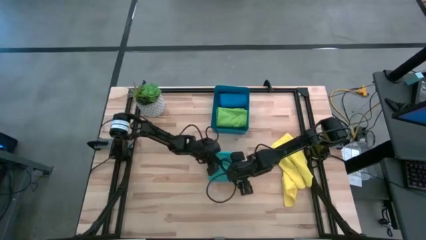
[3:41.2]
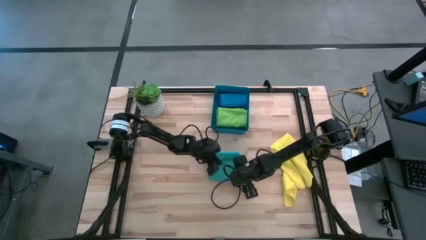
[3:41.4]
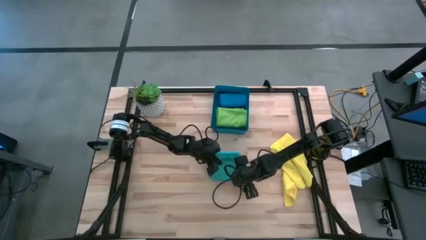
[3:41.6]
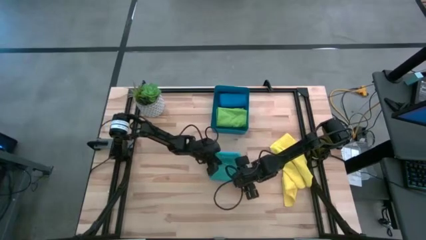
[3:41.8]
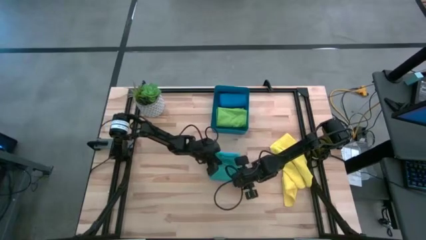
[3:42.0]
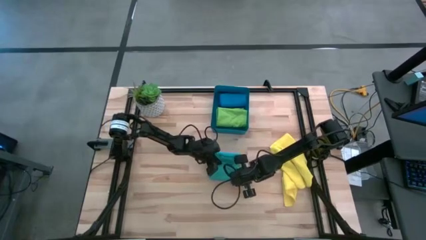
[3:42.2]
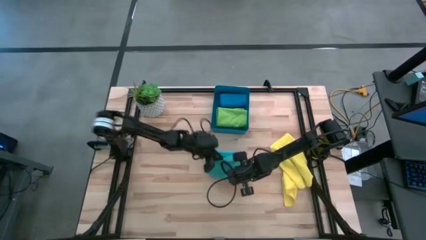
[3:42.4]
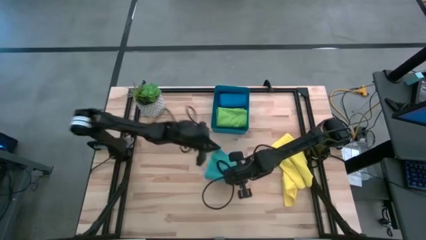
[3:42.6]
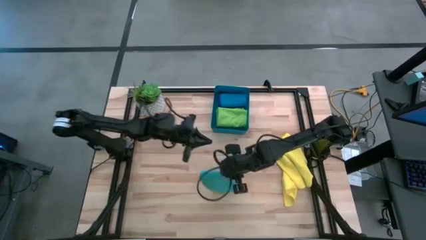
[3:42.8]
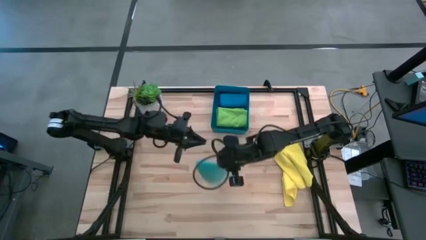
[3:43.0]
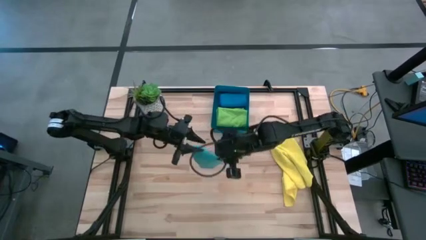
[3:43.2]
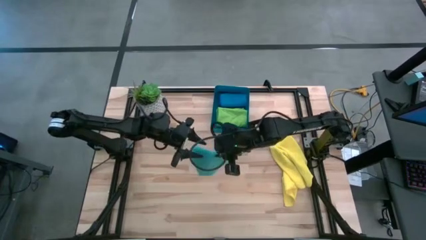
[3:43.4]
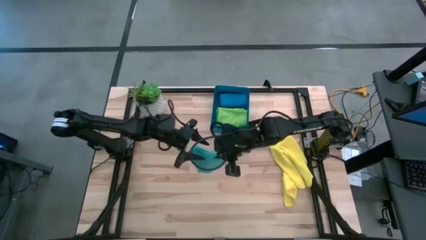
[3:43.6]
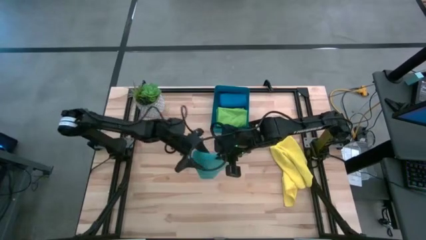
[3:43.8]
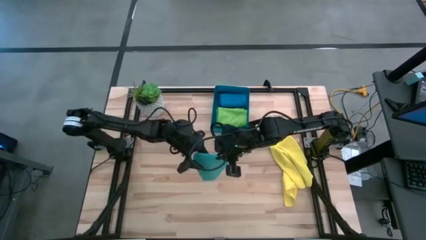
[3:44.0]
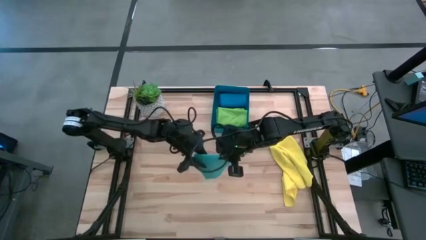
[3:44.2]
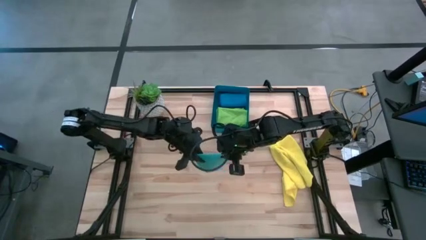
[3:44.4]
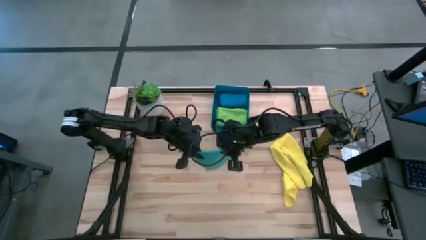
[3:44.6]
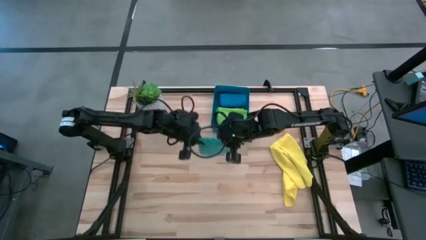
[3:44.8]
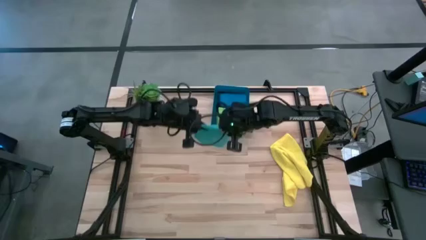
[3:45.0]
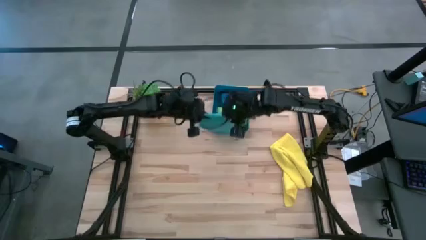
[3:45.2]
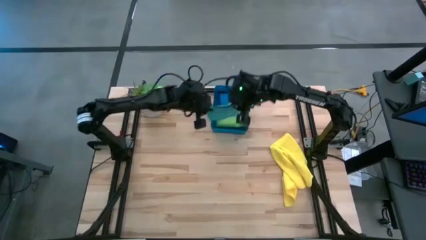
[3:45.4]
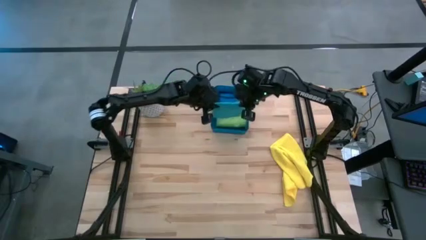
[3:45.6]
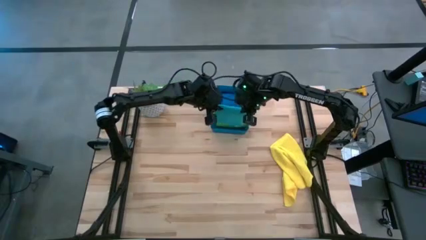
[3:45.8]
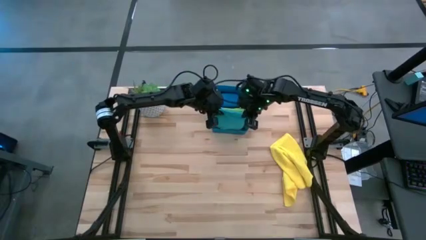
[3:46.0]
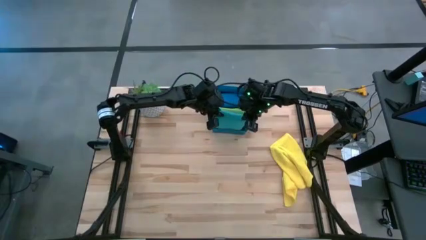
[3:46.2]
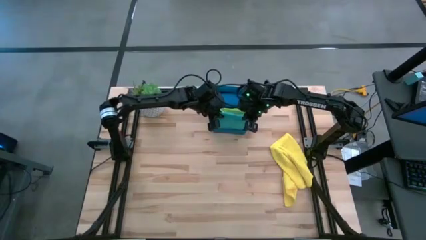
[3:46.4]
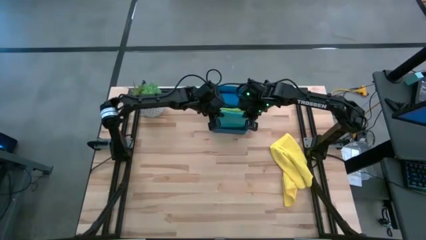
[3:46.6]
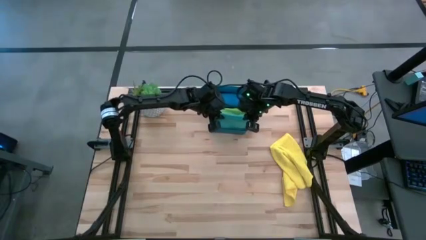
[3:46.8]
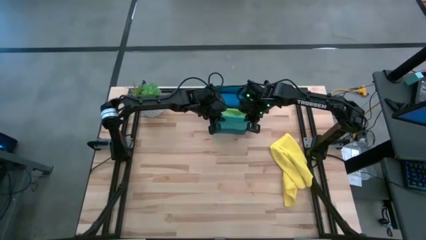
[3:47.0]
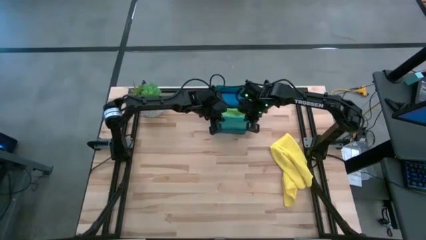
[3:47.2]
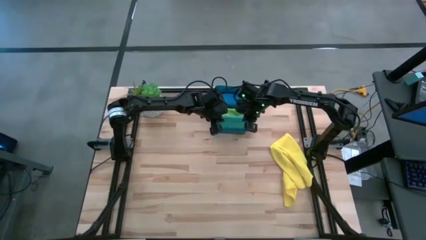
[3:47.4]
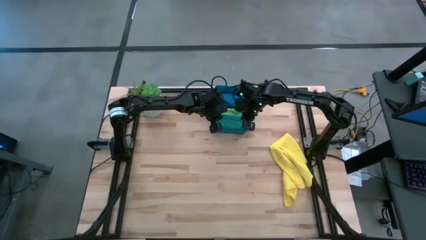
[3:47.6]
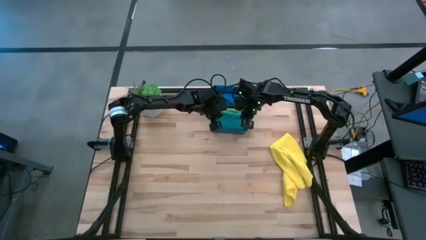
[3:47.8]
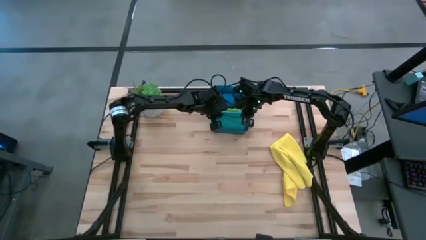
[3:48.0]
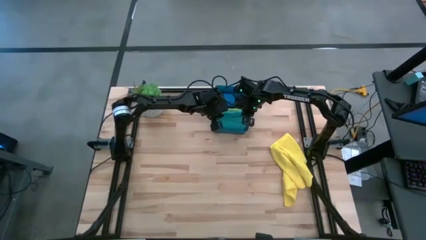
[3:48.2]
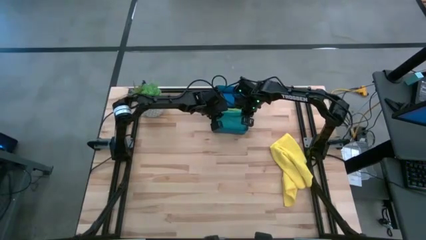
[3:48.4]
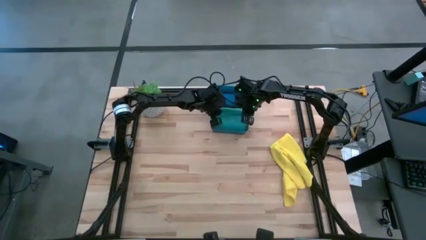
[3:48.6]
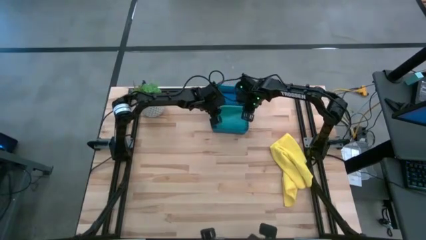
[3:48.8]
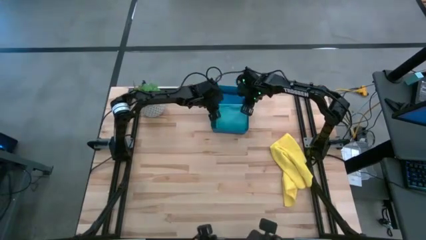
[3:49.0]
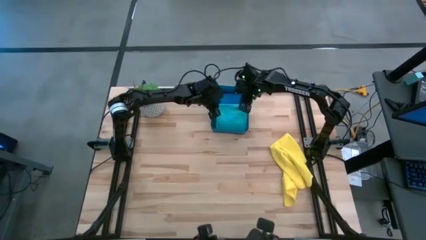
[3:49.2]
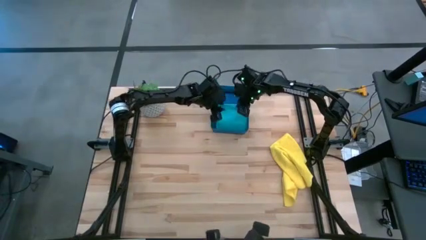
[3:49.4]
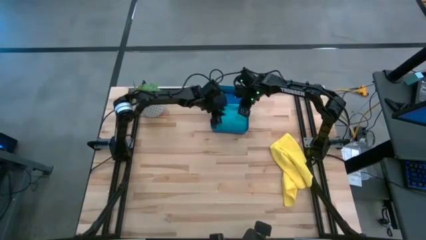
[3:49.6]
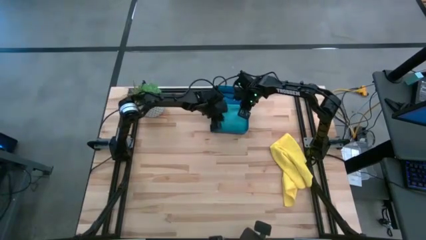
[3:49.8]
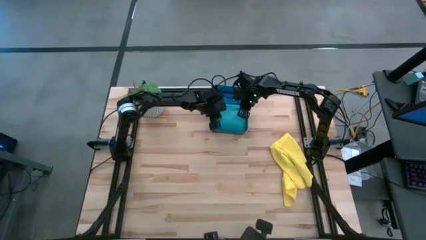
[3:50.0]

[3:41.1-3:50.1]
Task: Fold microfiber towels
Put the light blue microfiber cloth into the blue bin

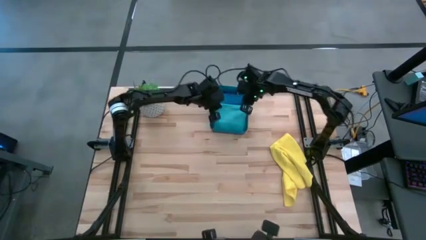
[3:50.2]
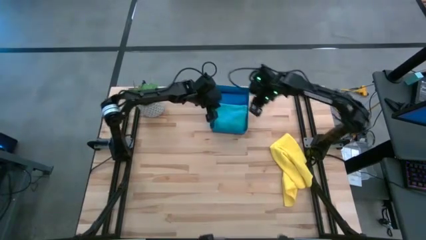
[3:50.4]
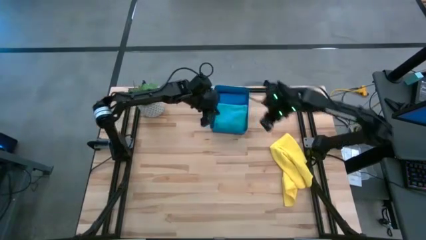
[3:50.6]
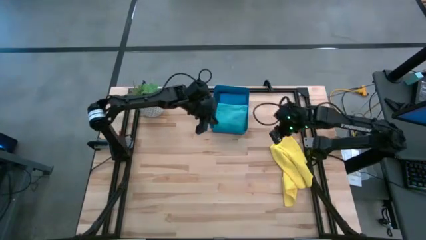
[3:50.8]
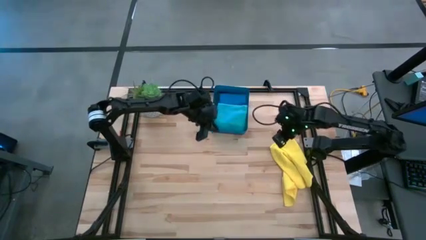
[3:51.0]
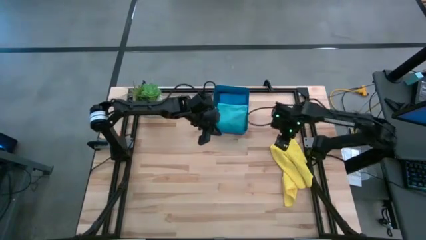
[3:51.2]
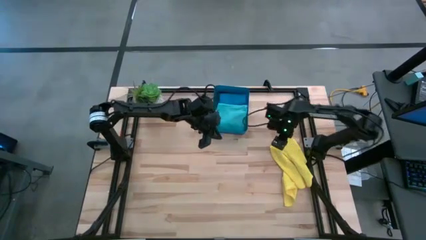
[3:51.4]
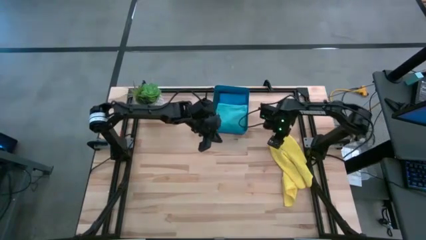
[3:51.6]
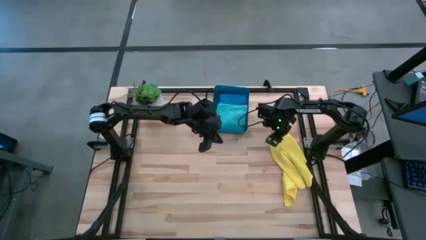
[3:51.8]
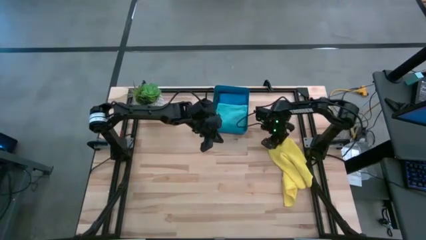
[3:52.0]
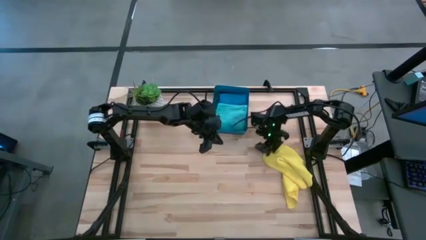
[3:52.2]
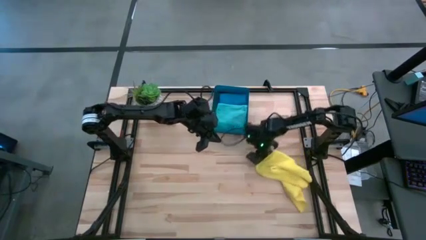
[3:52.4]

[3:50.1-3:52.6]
Fold the yellow microfiber cloth

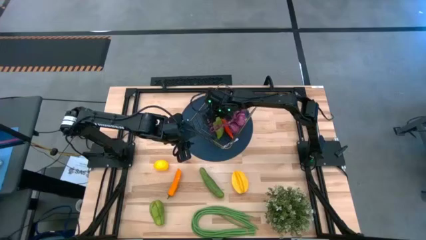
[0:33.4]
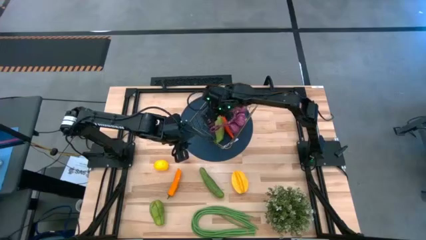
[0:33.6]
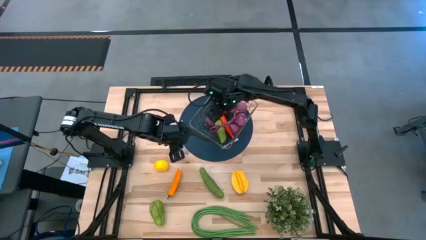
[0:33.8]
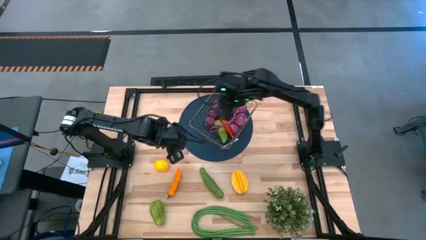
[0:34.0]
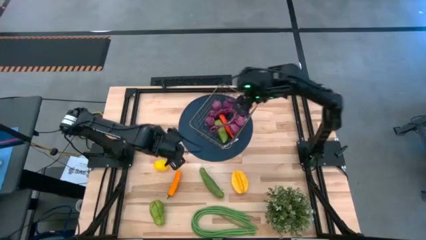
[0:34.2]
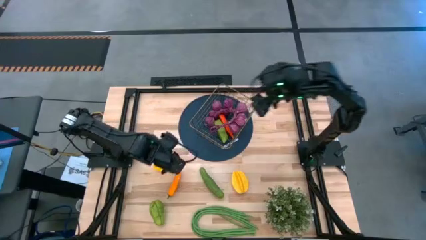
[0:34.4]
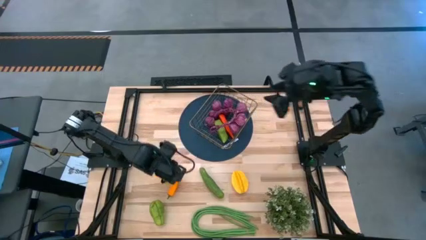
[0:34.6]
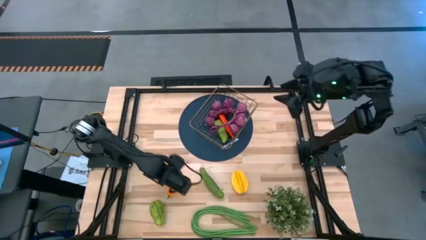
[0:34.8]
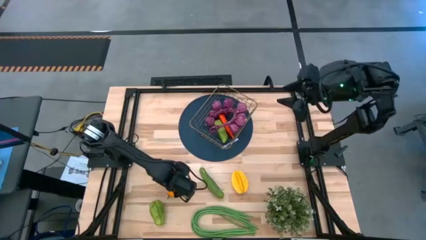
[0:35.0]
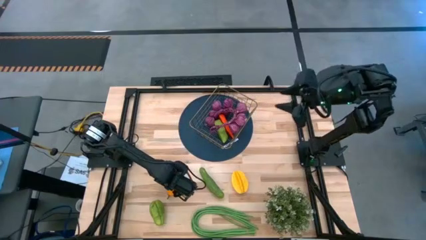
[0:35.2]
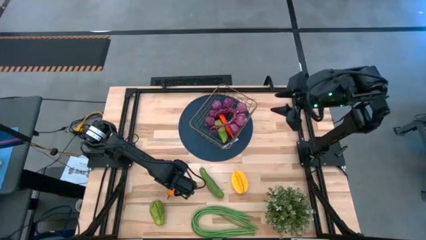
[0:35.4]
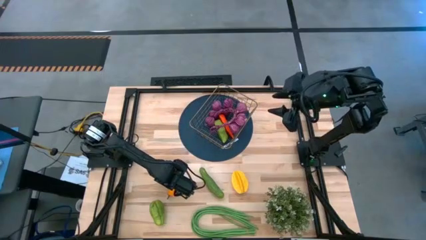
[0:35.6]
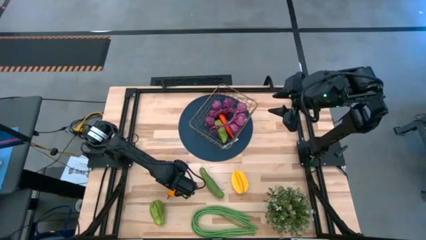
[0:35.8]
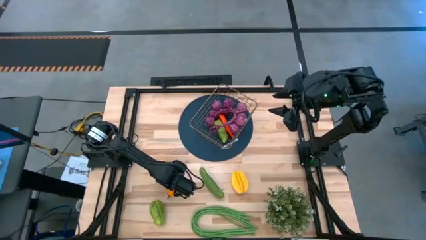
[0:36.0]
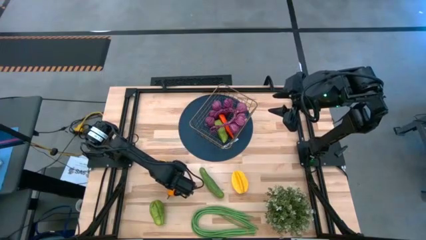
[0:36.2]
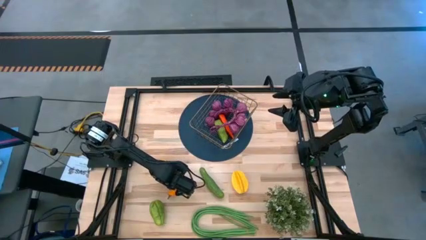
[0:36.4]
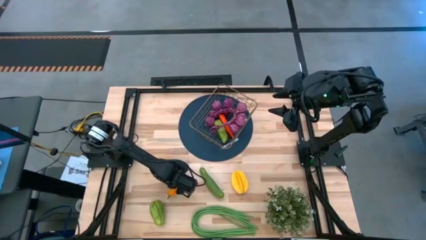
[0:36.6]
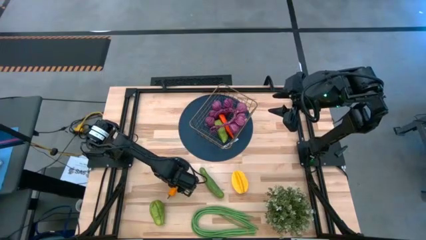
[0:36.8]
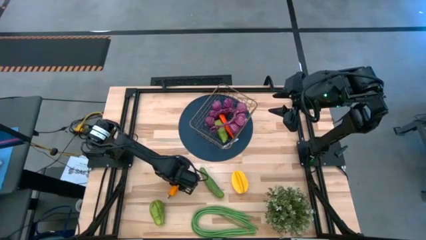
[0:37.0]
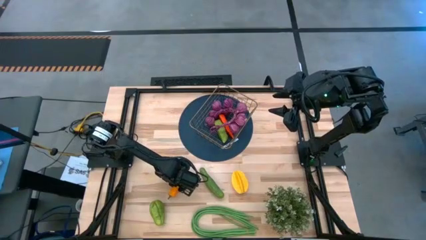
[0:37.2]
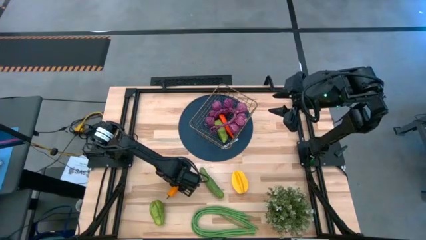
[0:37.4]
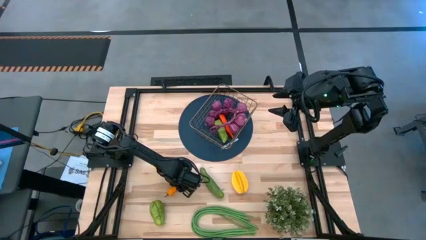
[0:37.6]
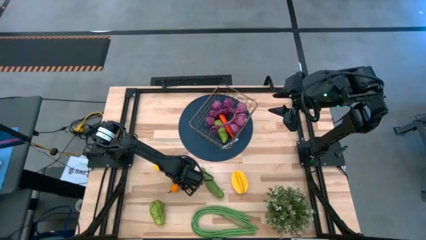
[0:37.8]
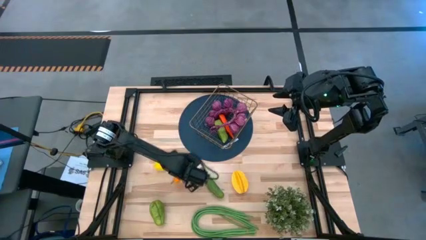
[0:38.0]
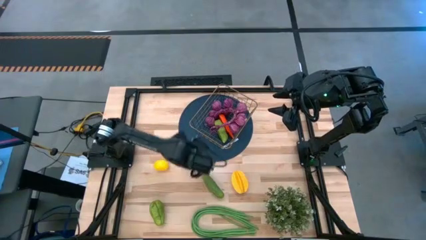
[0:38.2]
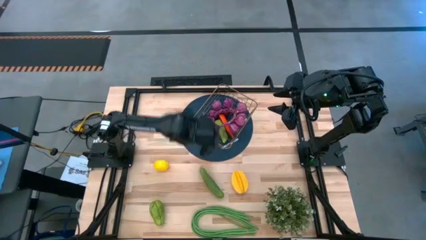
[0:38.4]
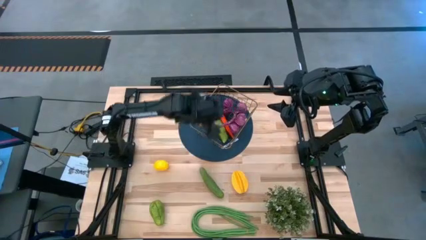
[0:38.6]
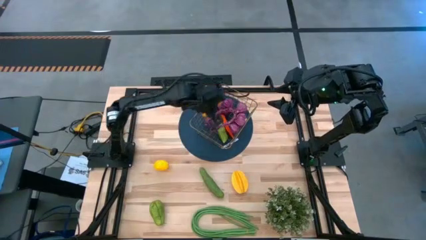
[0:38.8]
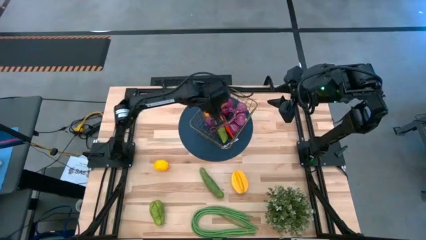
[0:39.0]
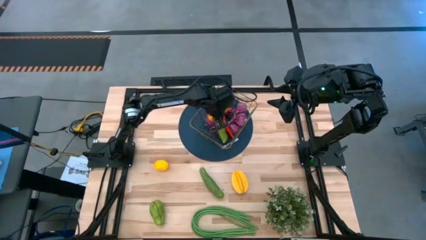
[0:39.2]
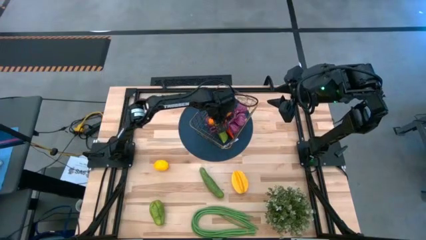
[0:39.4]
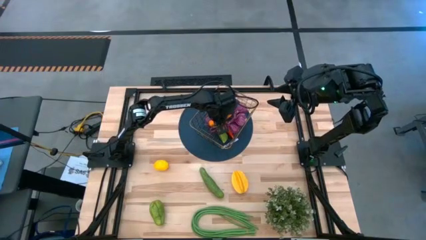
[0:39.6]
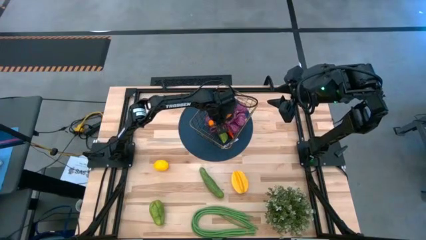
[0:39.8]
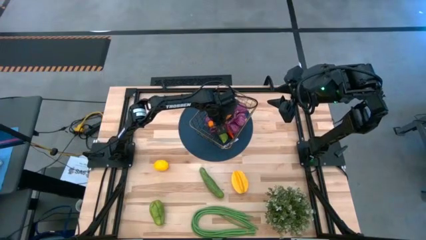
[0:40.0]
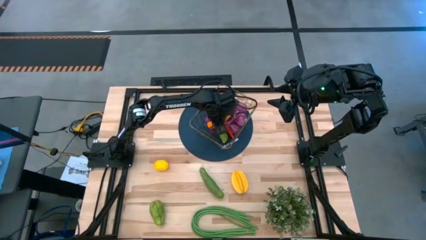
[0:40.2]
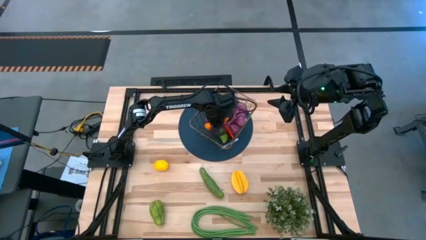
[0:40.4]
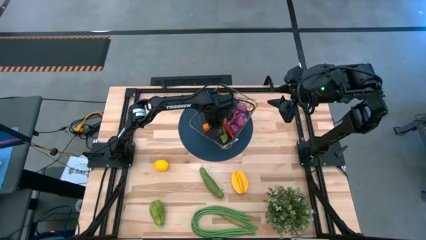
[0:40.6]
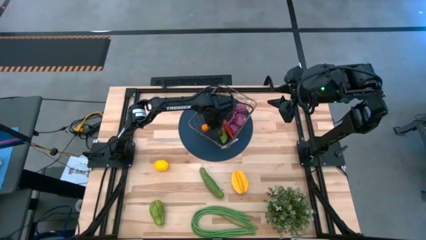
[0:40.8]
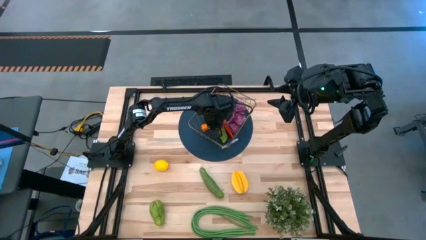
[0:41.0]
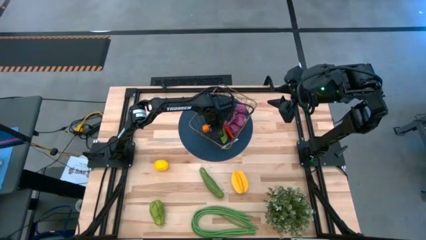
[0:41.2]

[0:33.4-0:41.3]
Task: Build produce basket
Put the yellow chili pepper into the wire basket
